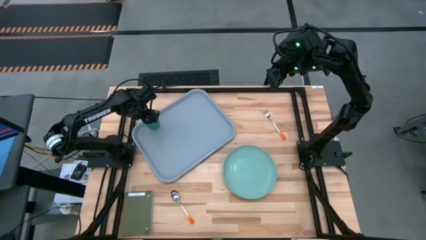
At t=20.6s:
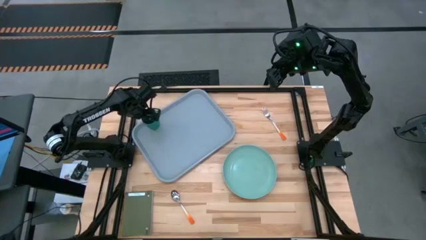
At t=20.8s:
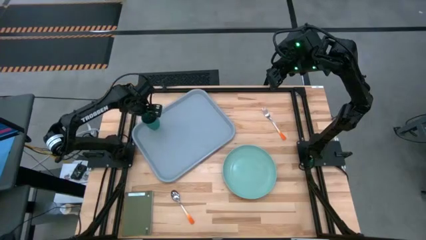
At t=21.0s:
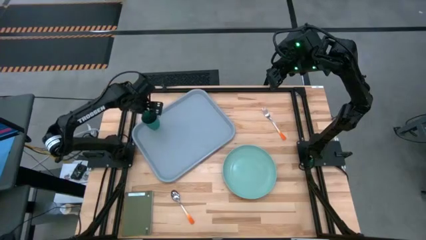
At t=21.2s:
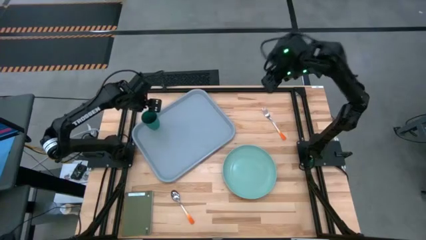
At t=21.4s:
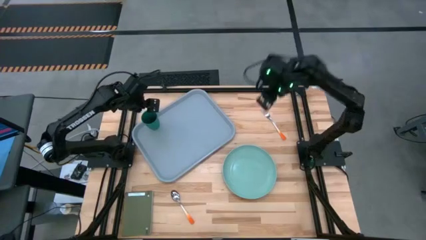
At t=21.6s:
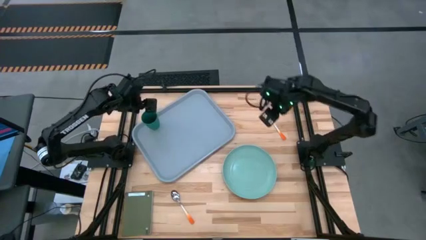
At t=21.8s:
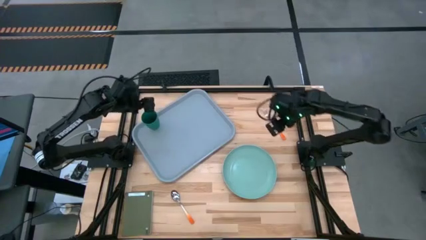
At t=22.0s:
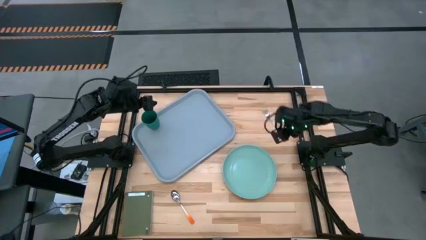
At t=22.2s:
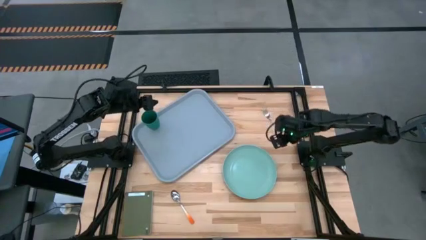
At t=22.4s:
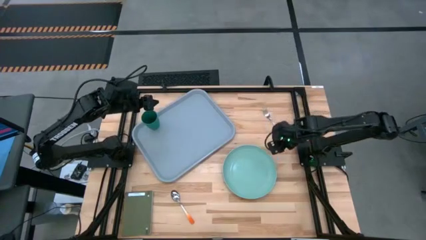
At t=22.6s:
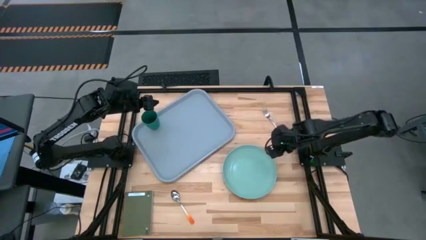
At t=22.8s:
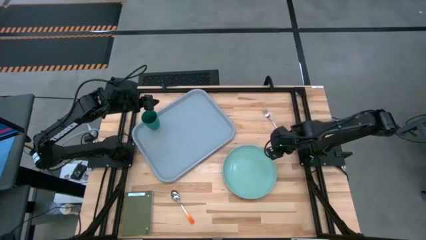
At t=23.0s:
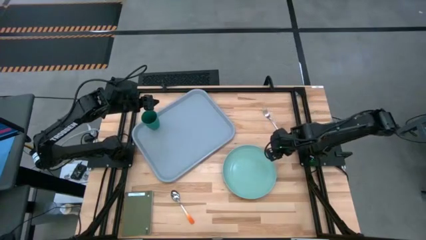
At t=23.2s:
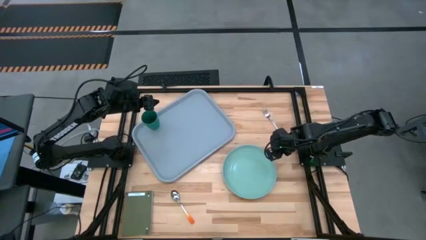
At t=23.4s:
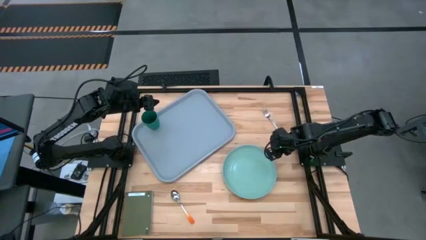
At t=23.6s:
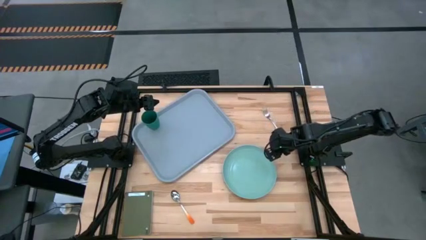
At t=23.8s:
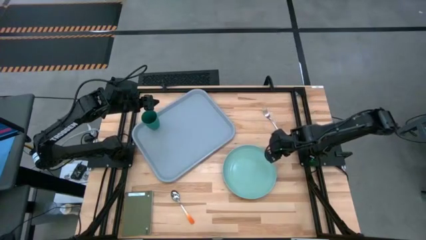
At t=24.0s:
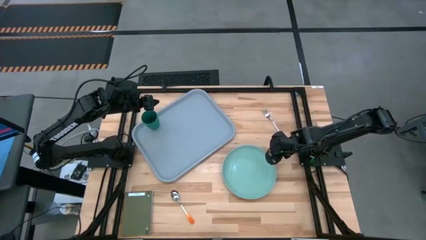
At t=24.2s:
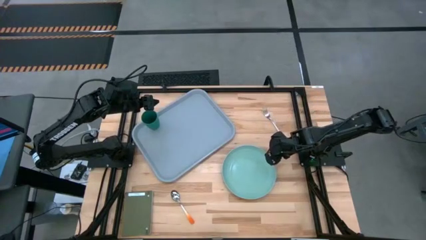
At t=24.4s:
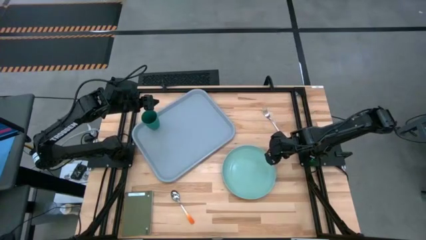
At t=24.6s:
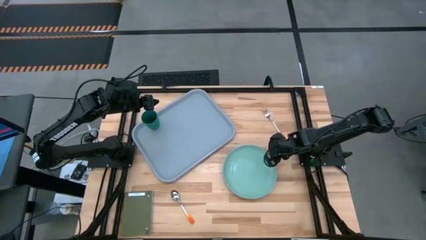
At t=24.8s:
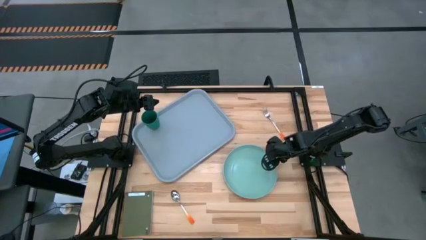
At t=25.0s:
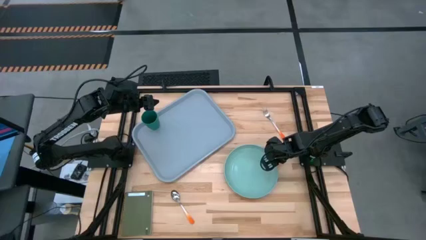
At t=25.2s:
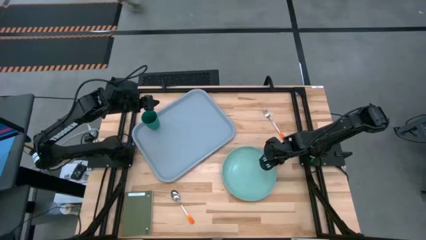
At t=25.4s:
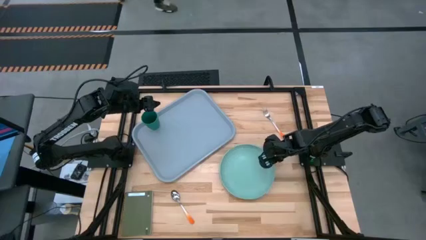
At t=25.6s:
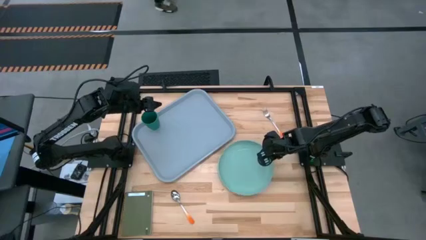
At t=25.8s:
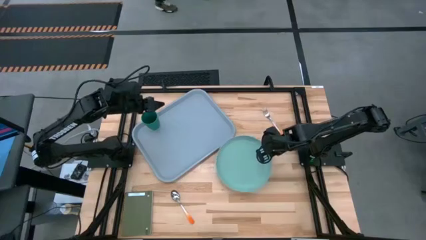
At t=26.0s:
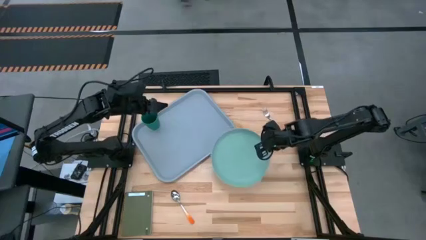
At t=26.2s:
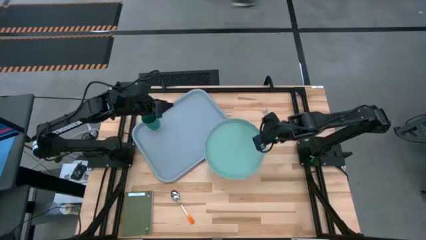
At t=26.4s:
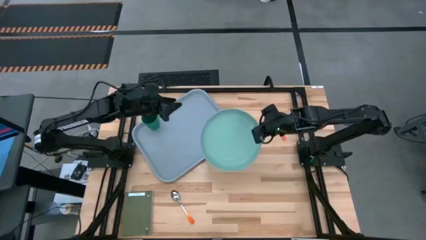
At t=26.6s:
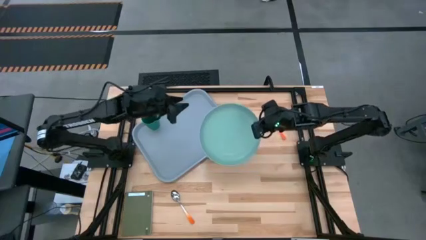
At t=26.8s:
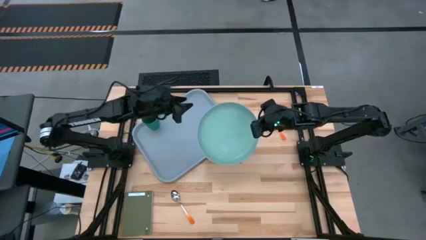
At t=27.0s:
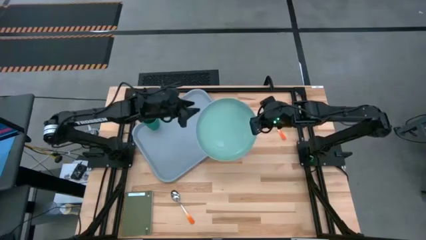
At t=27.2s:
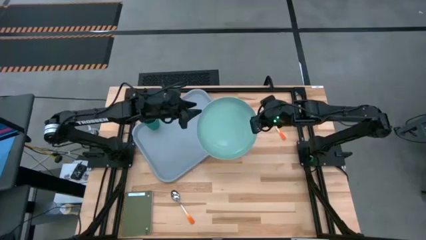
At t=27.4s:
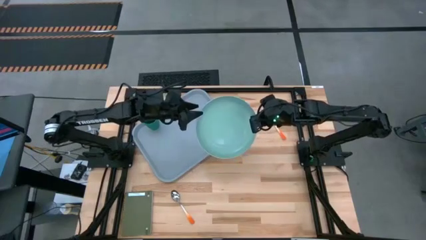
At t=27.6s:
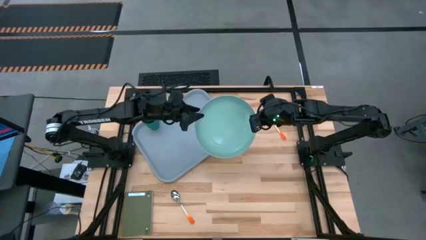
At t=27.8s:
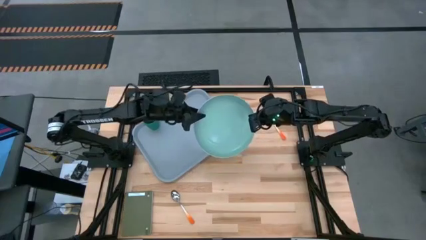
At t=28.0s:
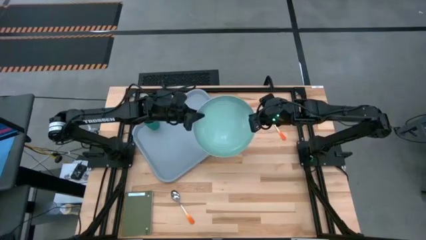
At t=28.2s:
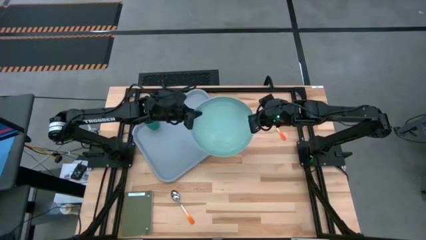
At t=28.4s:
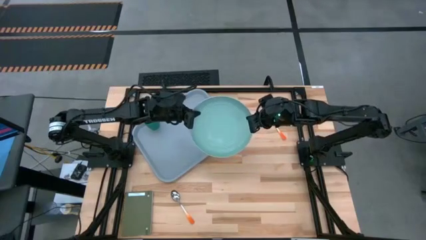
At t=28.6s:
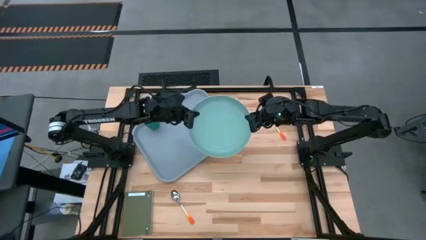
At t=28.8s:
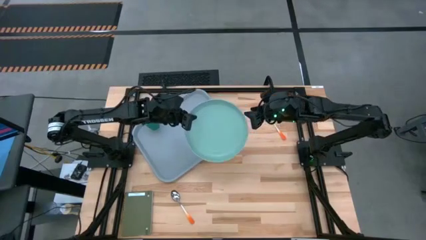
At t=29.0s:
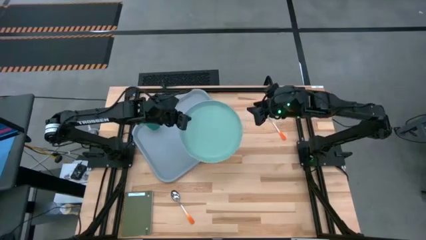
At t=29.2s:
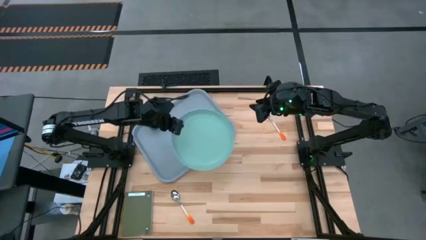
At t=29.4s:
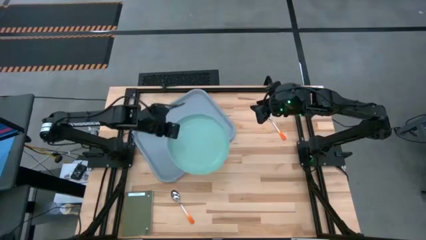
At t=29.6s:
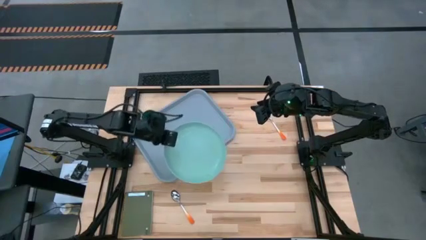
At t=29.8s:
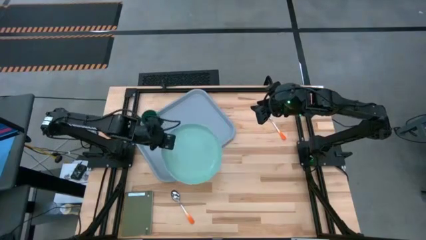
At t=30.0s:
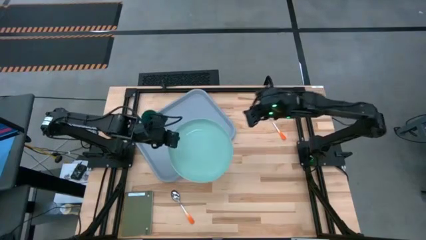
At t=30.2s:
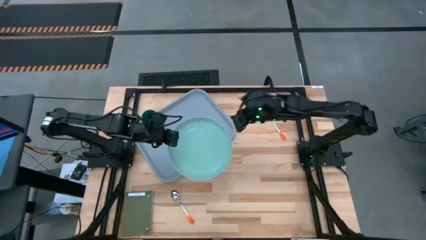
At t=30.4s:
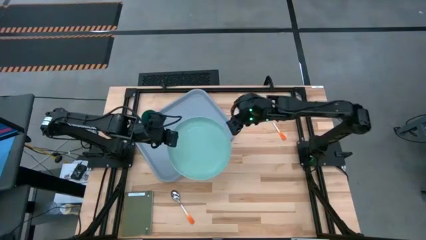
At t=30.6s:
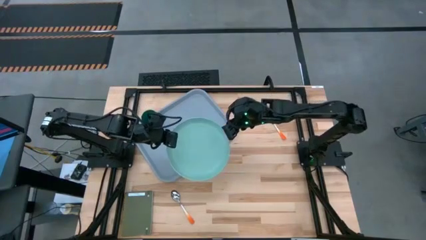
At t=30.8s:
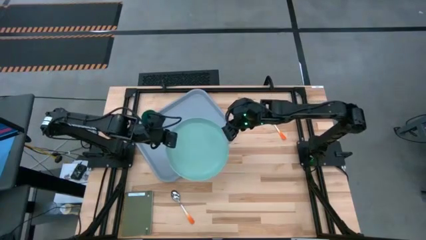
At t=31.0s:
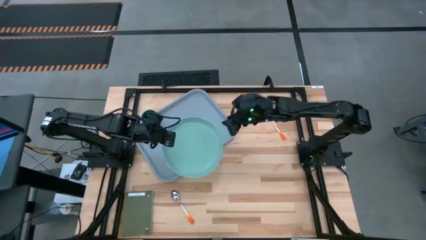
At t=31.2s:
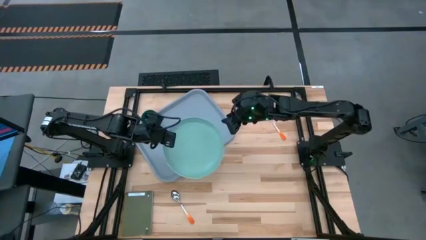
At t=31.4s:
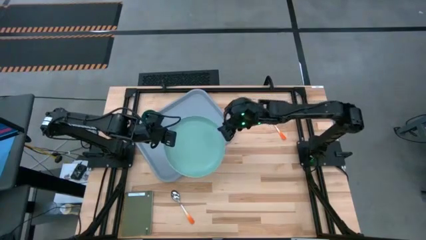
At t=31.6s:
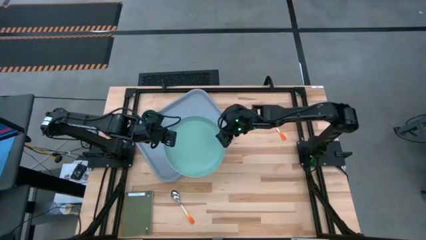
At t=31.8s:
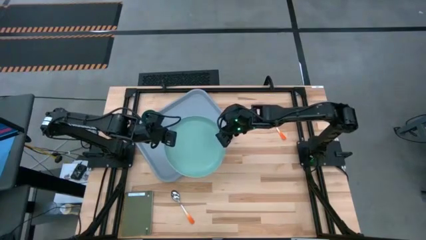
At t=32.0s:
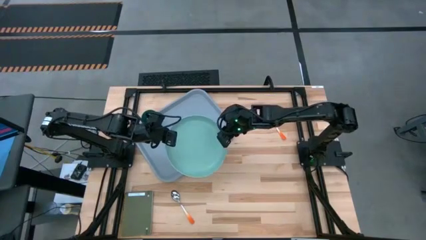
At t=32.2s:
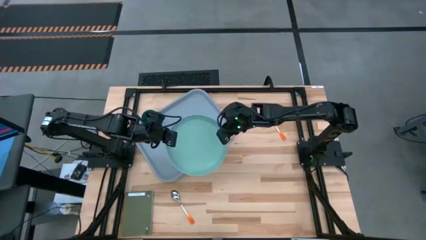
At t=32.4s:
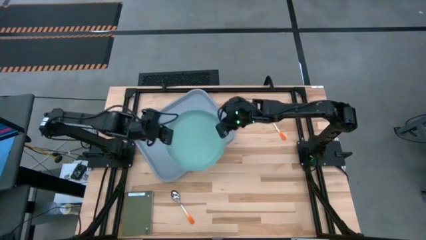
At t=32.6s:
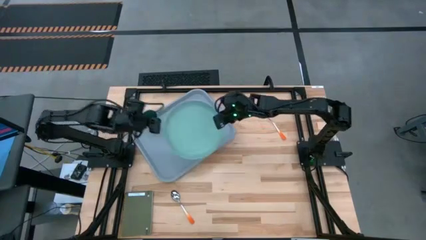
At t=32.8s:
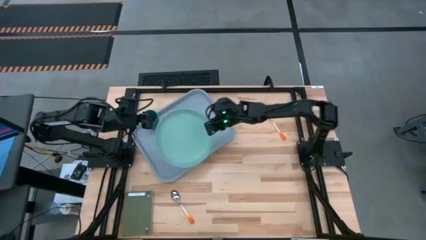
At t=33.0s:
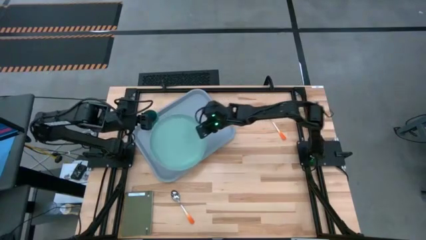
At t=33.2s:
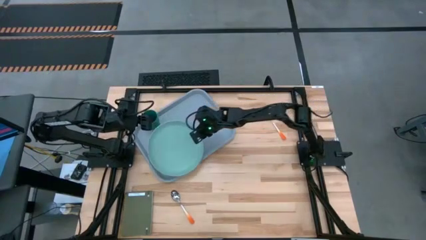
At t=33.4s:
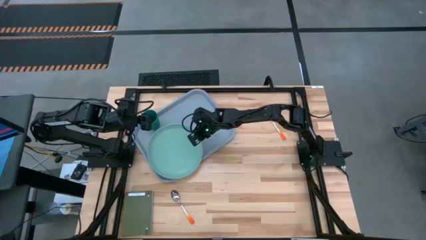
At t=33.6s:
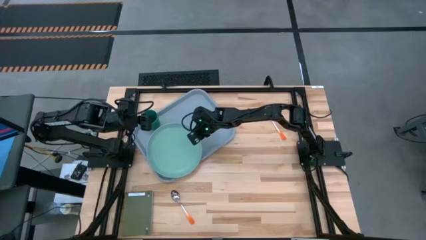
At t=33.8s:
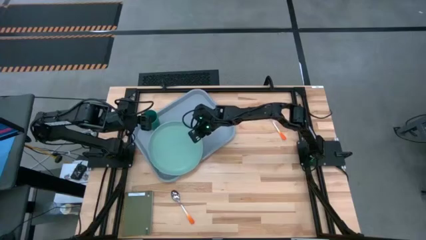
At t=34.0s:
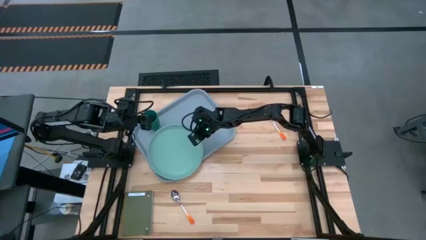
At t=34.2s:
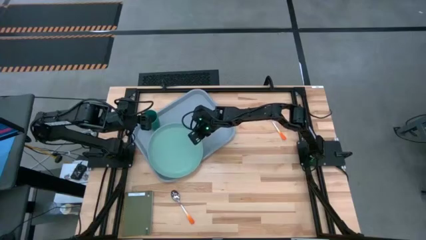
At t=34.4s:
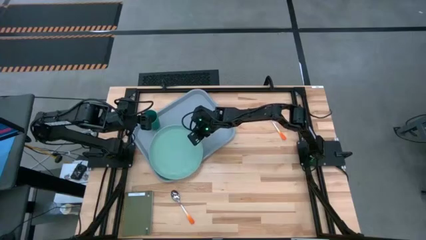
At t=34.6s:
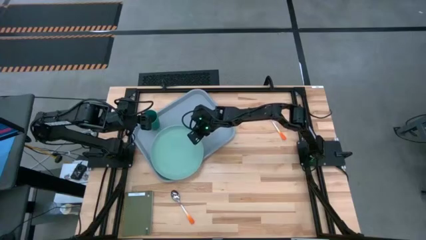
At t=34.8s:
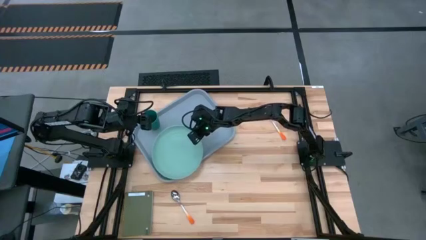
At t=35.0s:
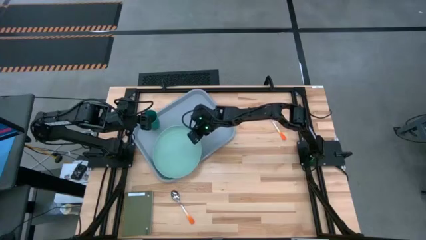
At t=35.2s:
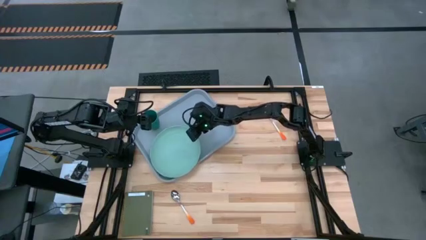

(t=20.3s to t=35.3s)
Task: Pick and place plate/cup/fork/spoon on tray
Put the light gray plate on the gray tray at the bottom of the teal cup
